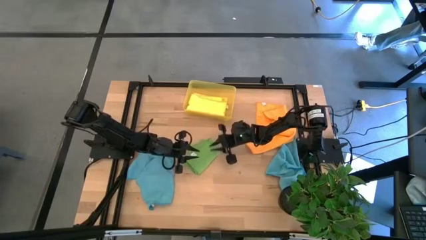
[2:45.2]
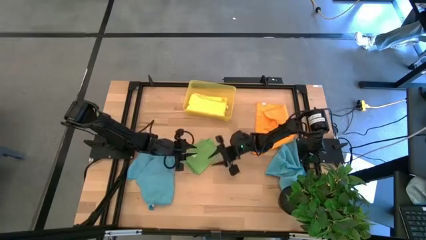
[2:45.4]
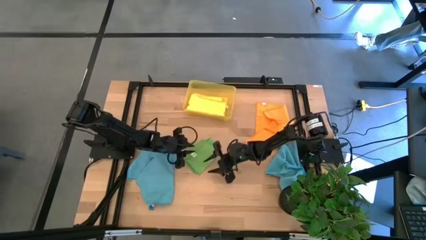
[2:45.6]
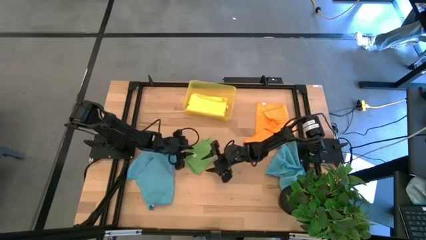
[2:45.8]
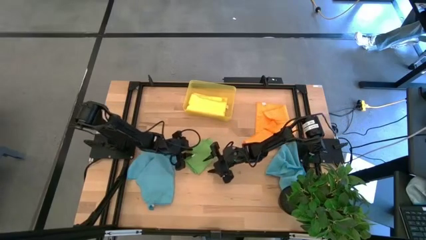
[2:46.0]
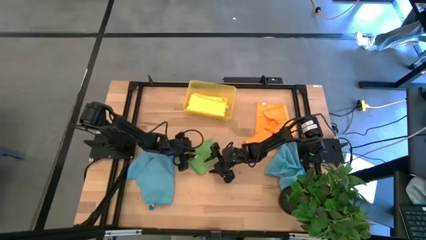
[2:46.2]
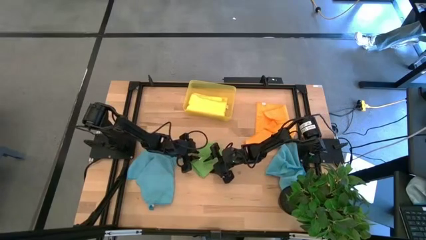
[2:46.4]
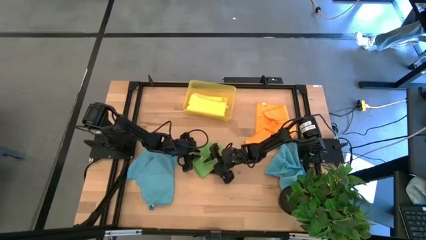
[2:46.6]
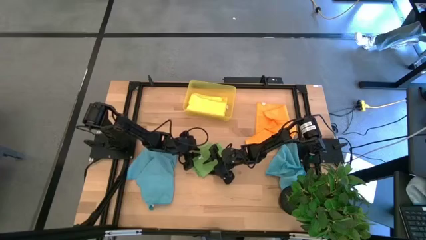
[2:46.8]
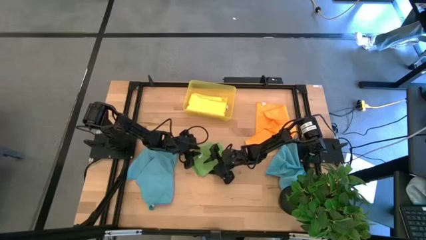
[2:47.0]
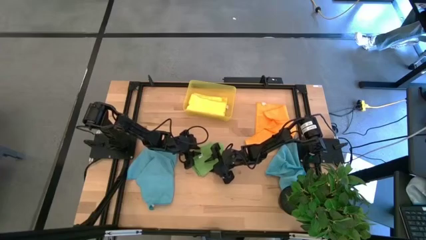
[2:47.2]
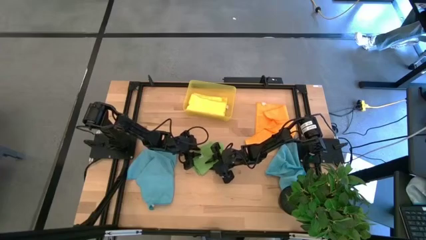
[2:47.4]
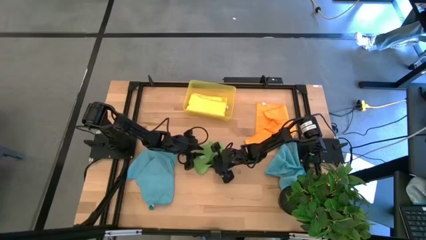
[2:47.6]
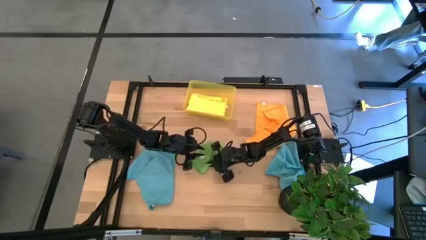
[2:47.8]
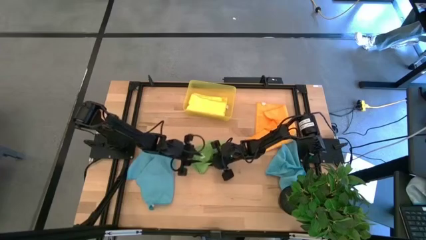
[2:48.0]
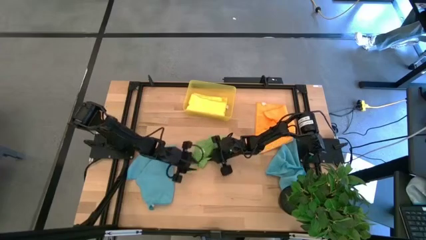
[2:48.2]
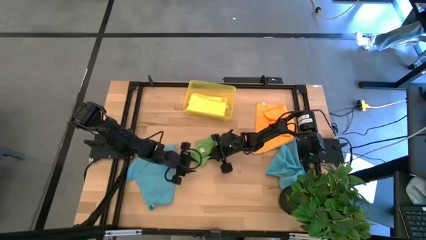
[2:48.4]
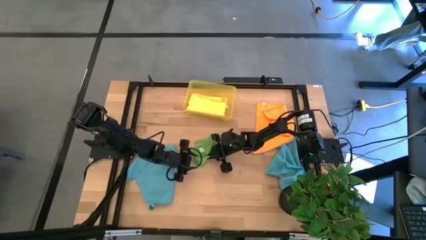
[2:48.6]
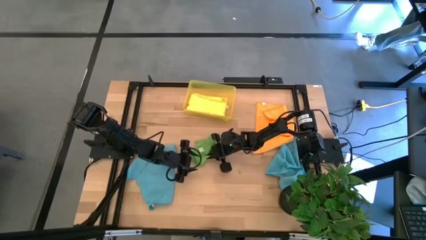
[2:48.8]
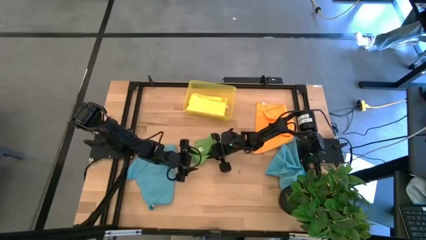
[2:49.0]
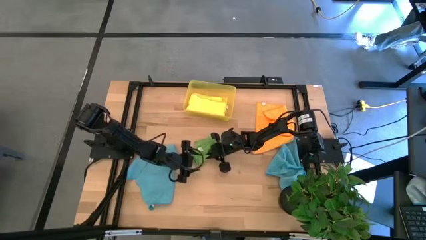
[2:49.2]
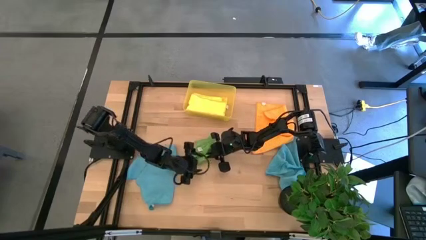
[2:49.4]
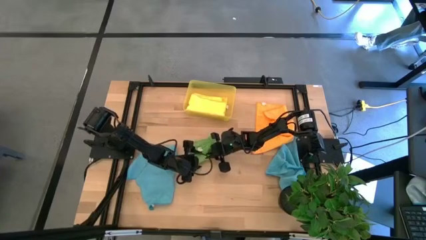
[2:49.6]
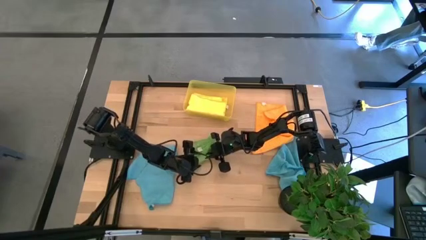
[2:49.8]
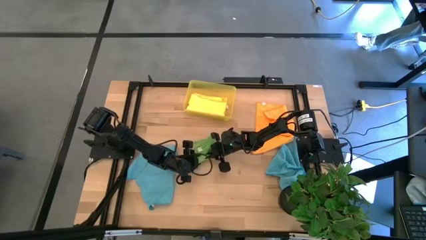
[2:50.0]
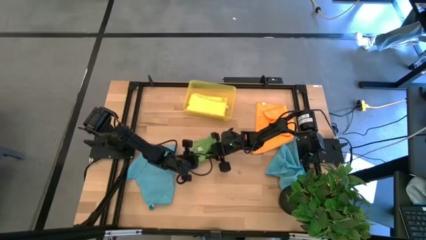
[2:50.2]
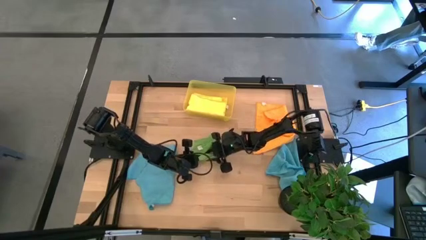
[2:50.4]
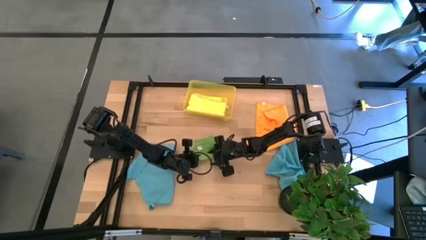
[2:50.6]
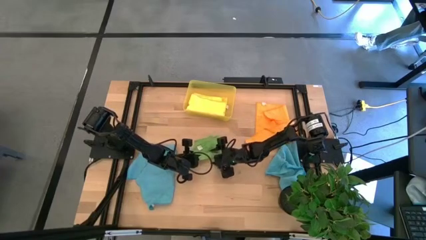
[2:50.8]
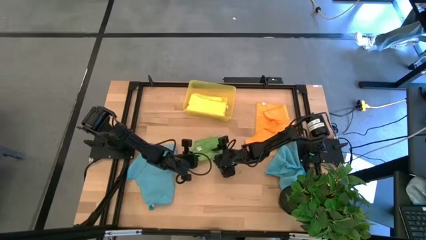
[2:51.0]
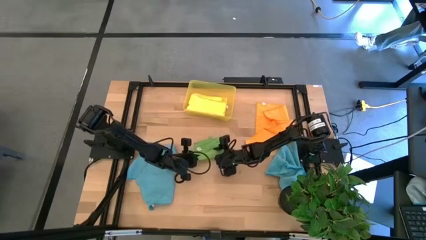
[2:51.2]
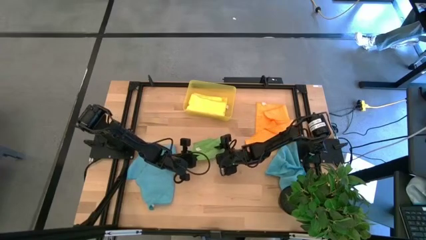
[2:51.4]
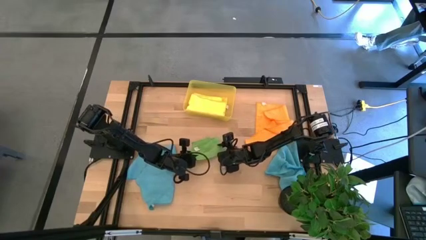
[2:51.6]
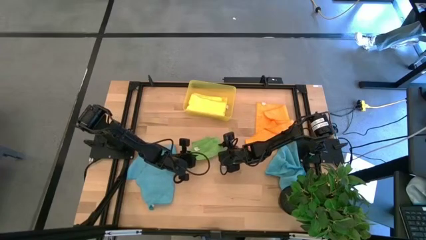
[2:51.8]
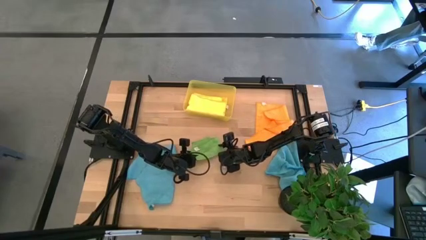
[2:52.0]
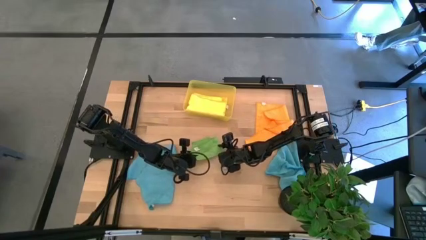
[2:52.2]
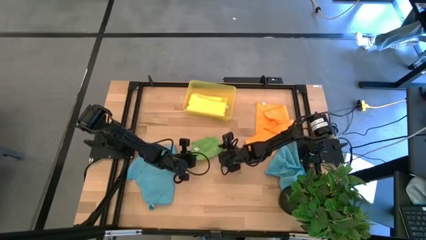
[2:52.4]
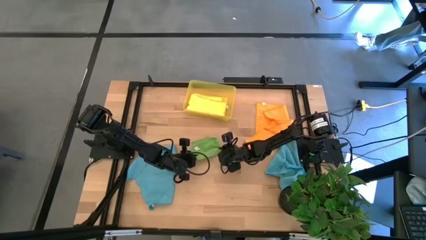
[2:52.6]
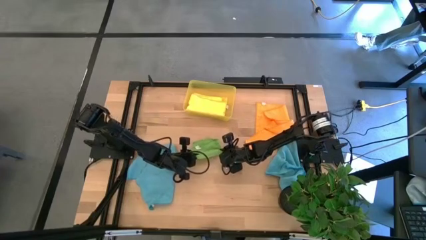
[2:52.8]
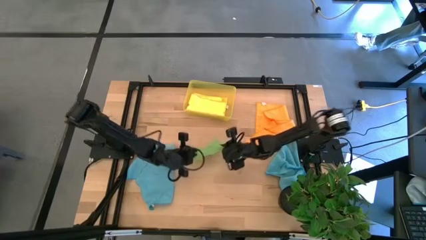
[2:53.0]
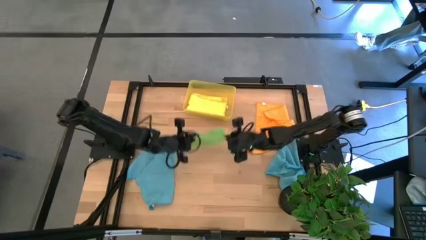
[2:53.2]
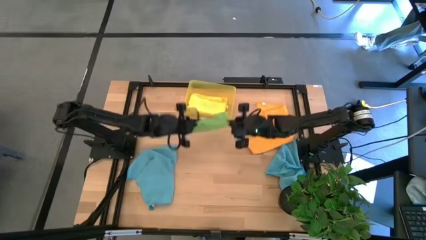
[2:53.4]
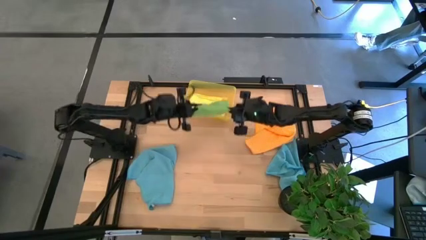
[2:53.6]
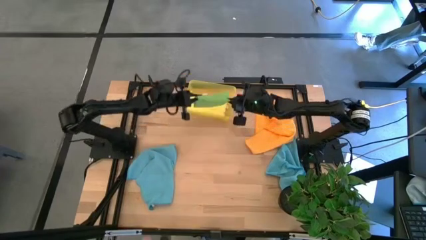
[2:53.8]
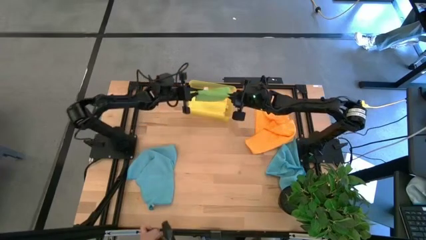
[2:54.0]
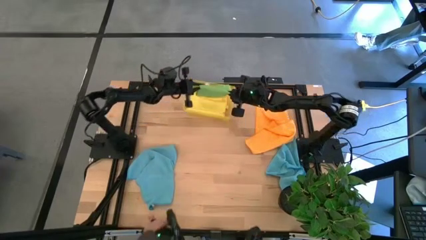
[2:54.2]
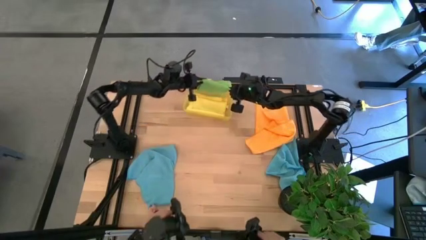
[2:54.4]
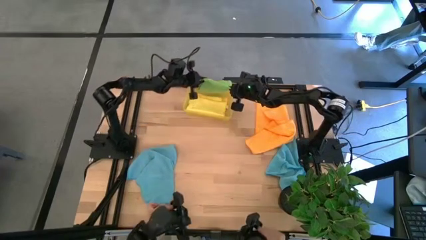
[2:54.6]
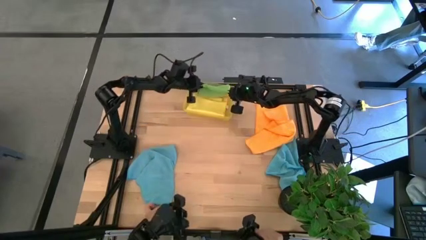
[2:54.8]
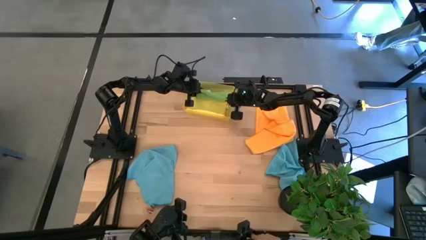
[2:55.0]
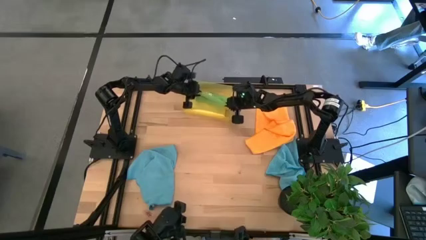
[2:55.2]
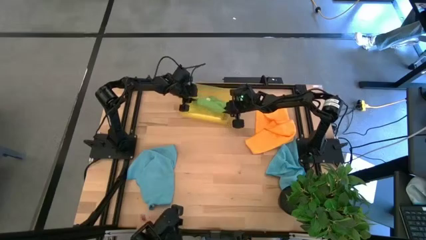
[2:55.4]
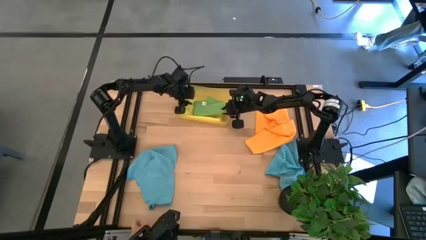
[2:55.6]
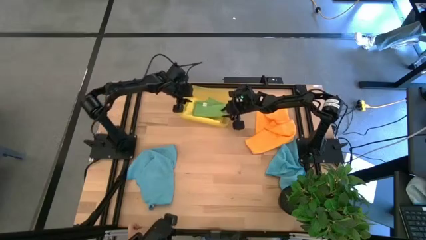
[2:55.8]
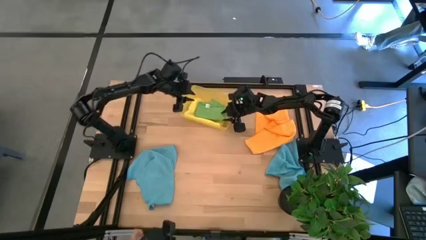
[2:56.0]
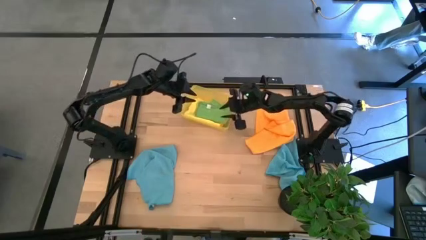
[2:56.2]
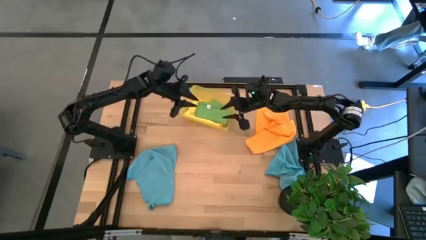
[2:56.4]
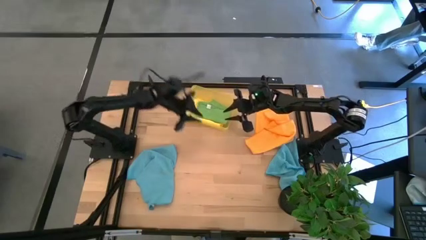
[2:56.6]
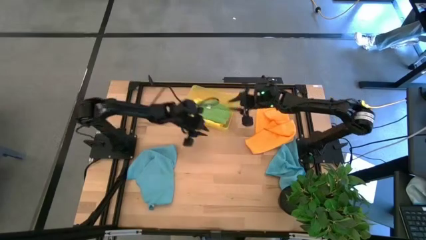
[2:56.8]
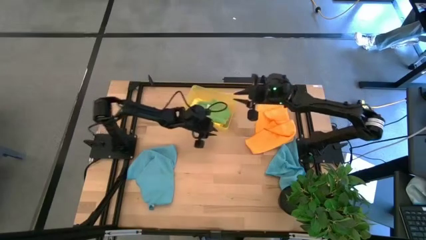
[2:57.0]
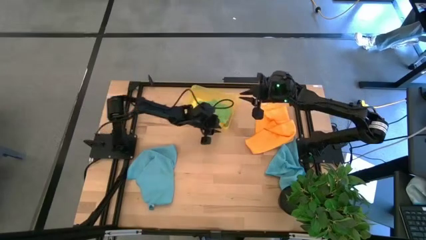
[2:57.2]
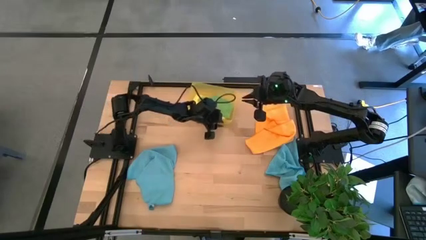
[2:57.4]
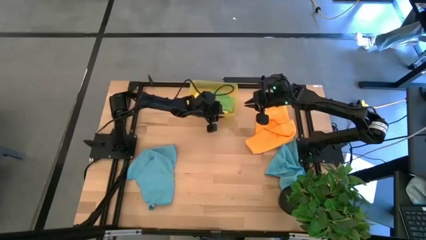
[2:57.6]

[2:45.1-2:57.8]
Task: Fold microfiber towels
Put the green towel into the yellow bin
